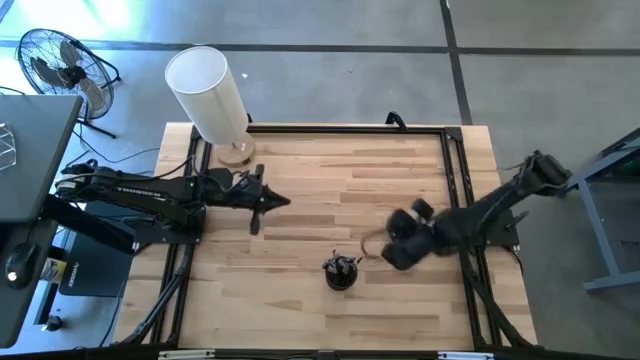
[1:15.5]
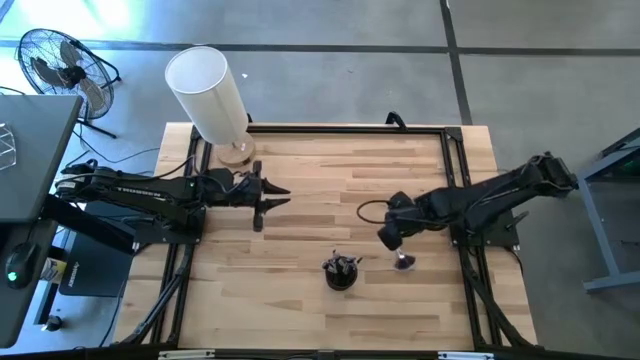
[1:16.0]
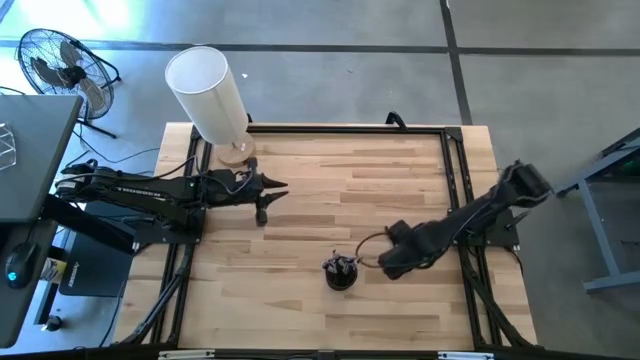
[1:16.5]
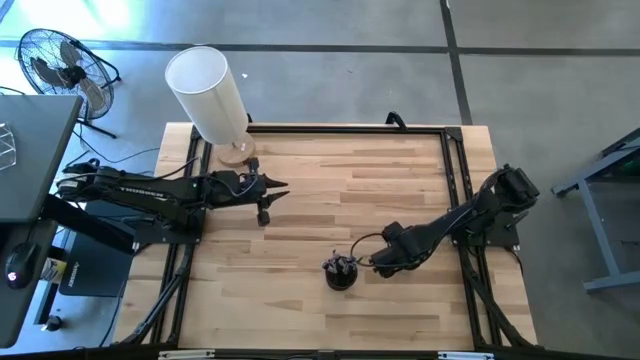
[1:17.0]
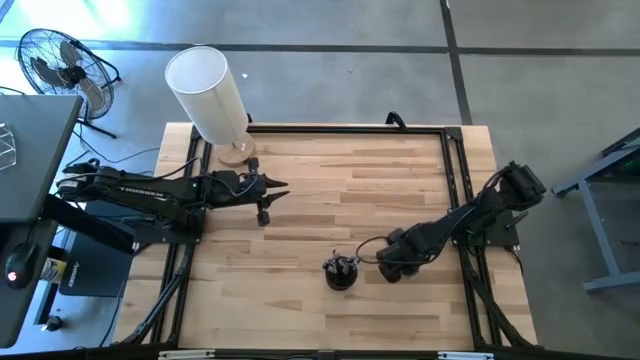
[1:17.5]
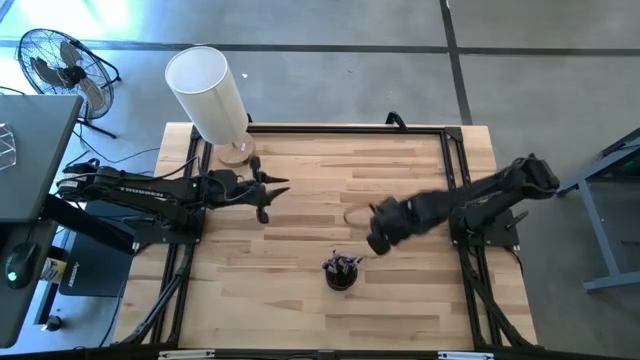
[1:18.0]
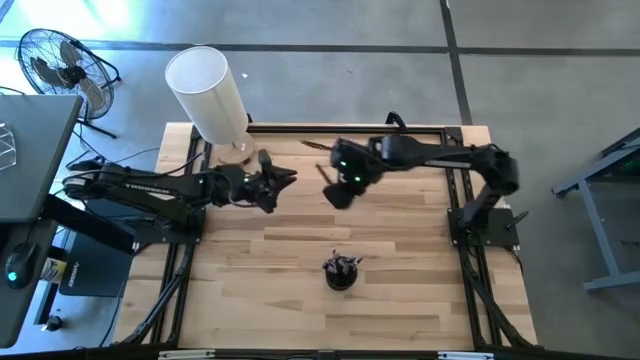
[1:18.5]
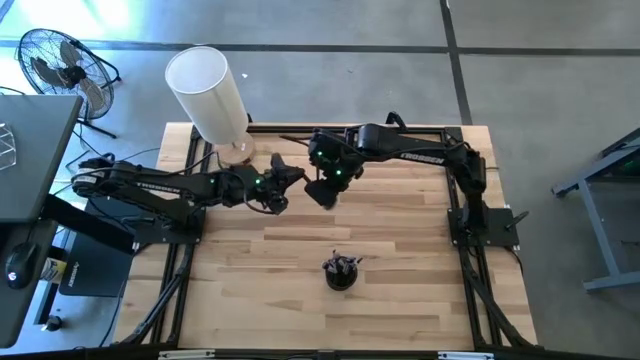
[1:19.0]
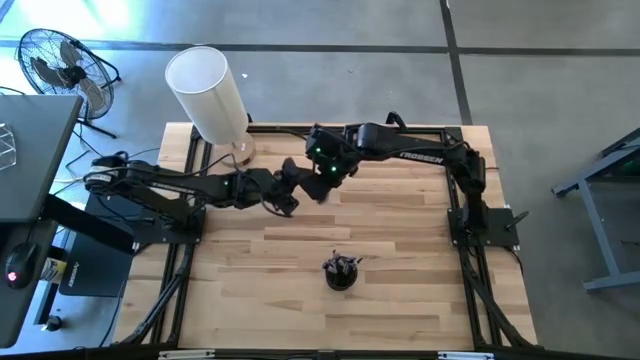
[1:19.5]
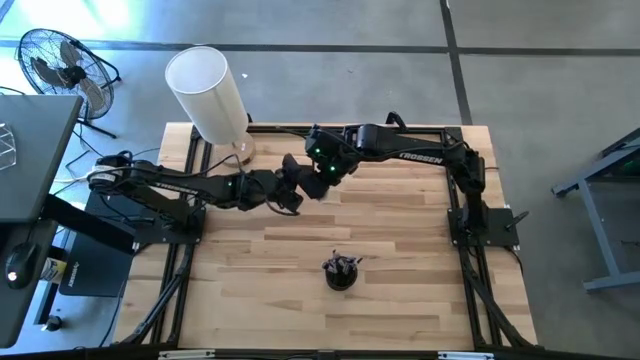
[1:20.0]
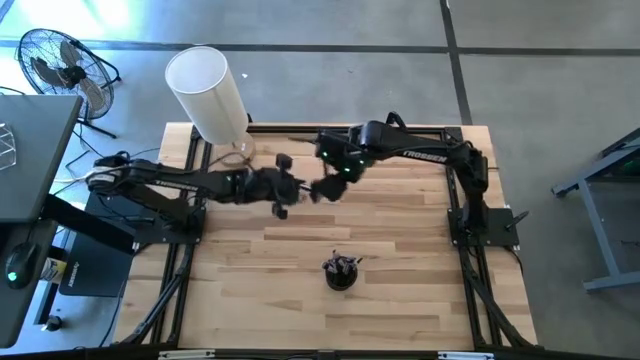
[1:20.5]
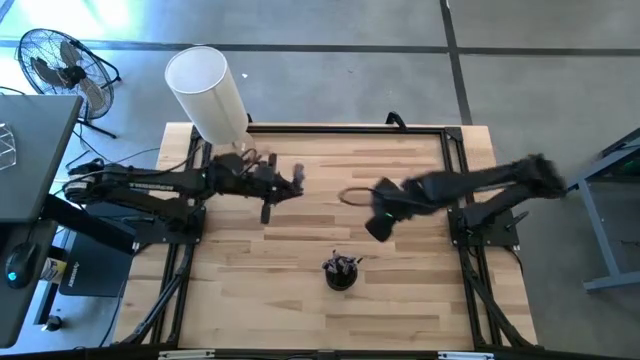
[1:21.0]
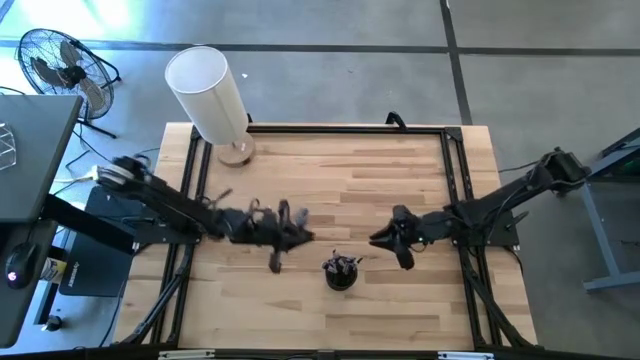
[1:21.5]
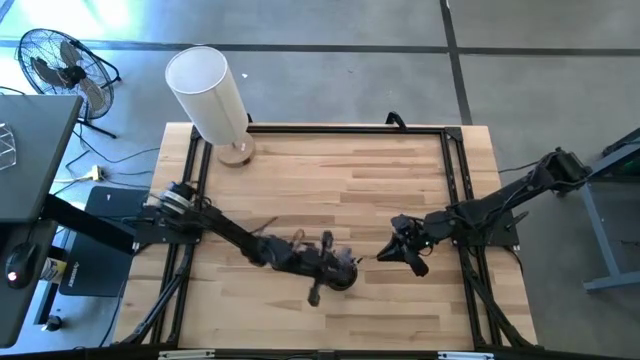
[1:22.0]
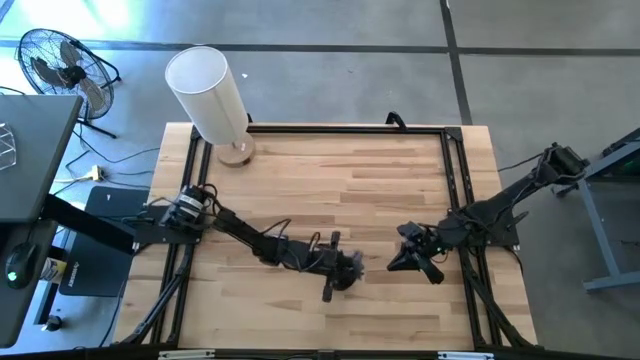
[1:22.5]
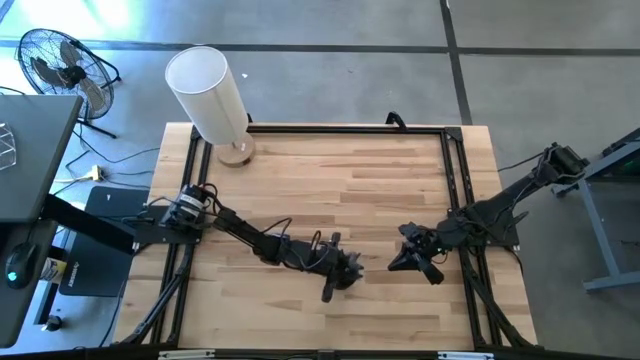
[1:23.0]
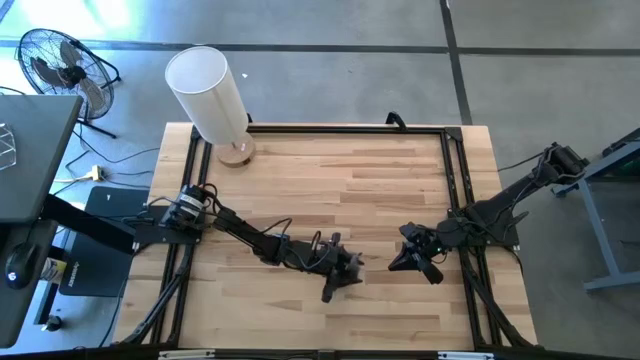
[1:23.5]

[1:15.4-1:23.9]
Task: Pick & Place Makeup Supplies
Put the makeup brush into the black makeup holder

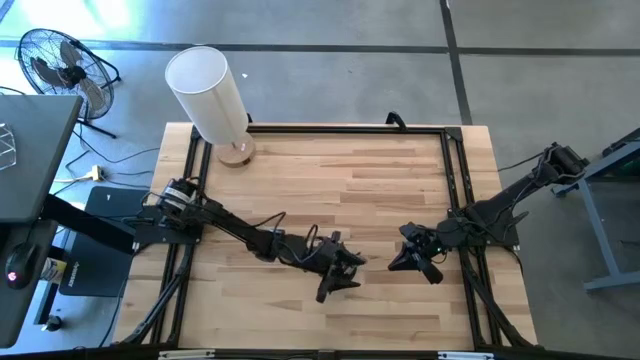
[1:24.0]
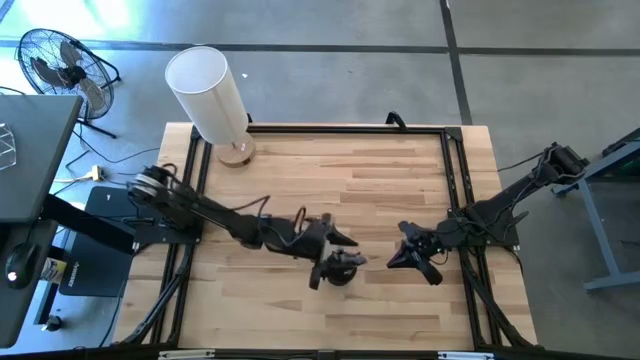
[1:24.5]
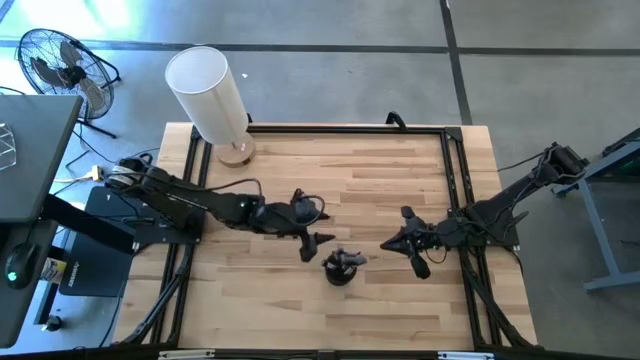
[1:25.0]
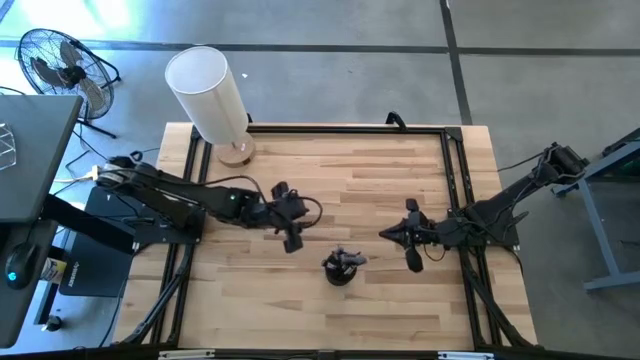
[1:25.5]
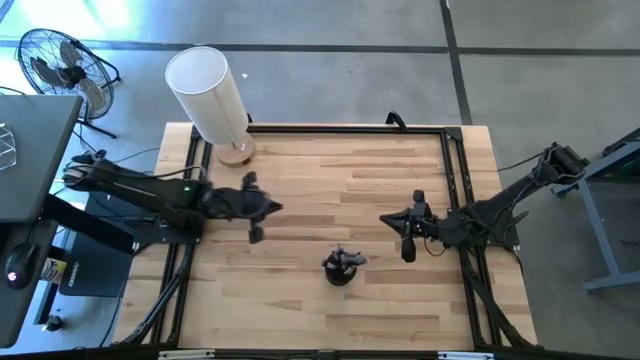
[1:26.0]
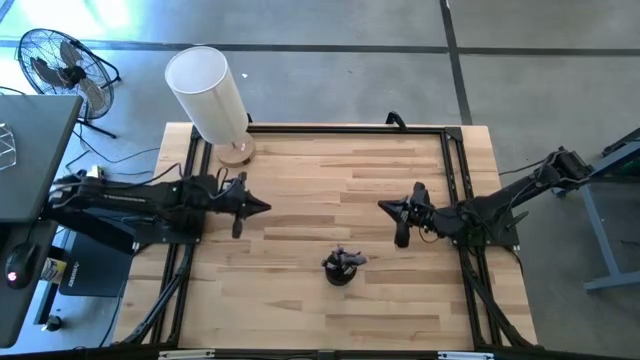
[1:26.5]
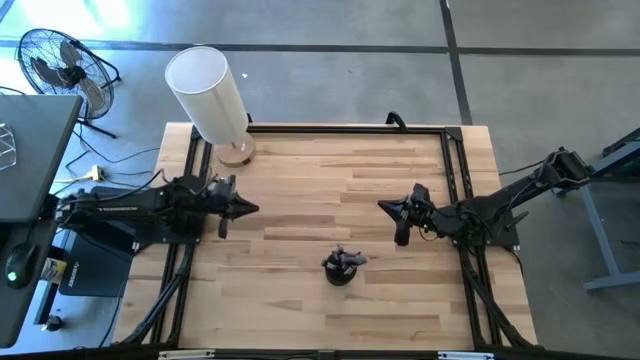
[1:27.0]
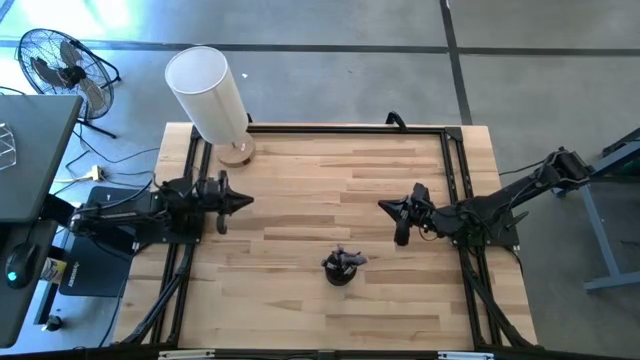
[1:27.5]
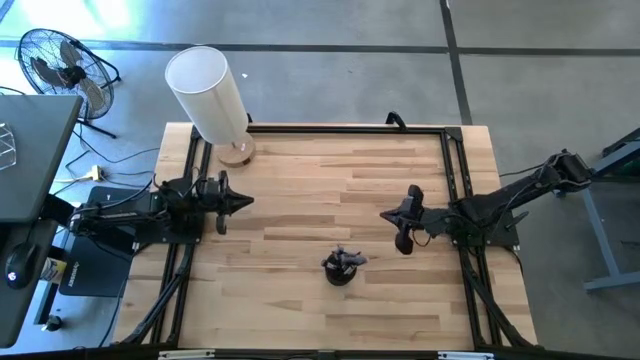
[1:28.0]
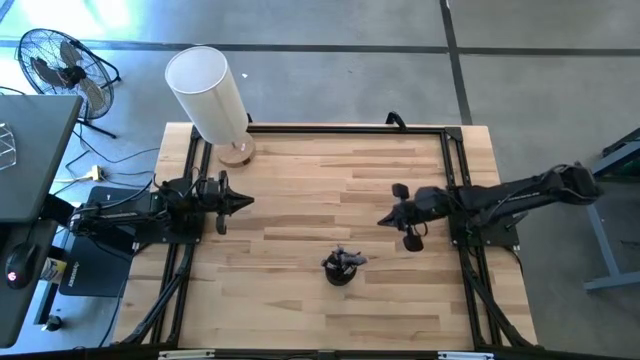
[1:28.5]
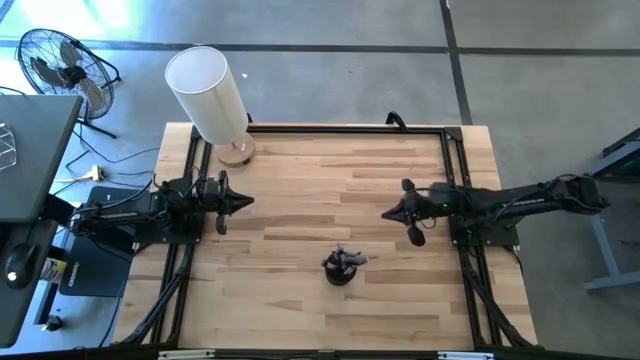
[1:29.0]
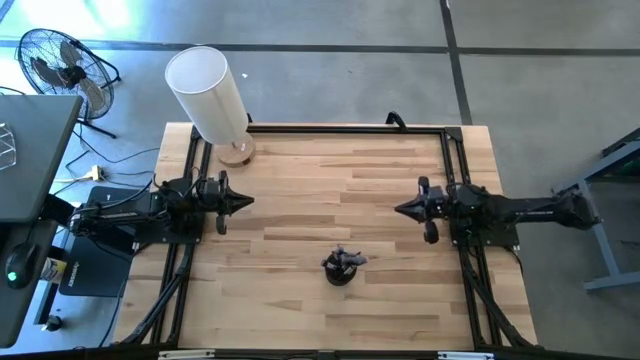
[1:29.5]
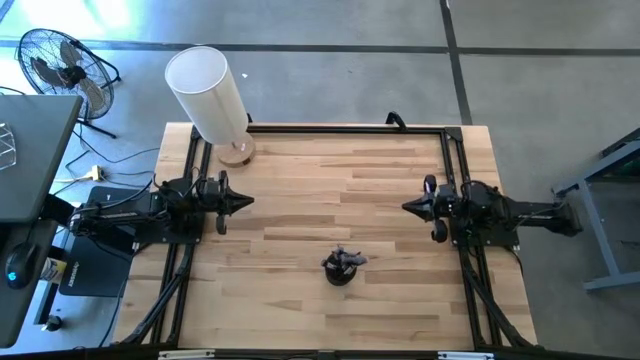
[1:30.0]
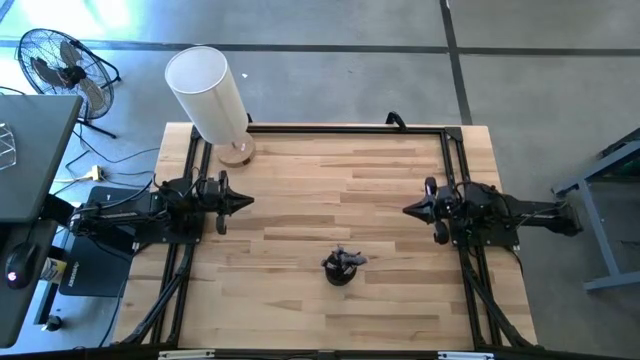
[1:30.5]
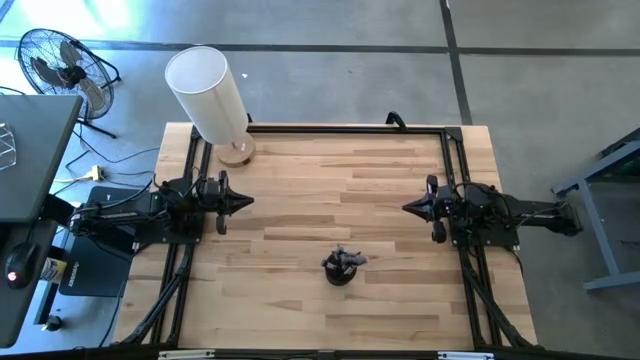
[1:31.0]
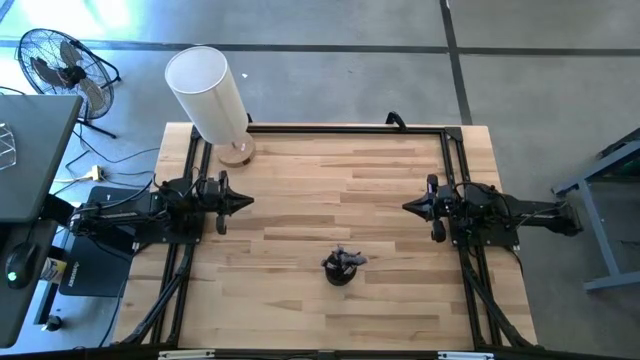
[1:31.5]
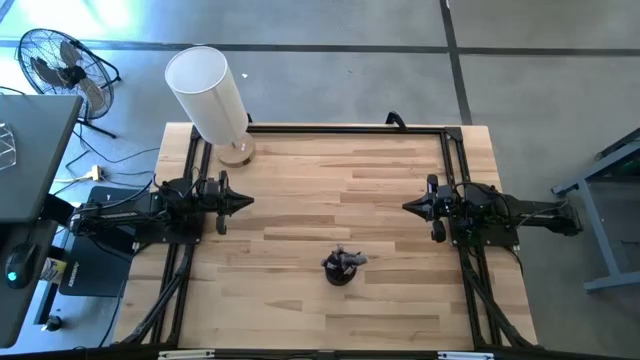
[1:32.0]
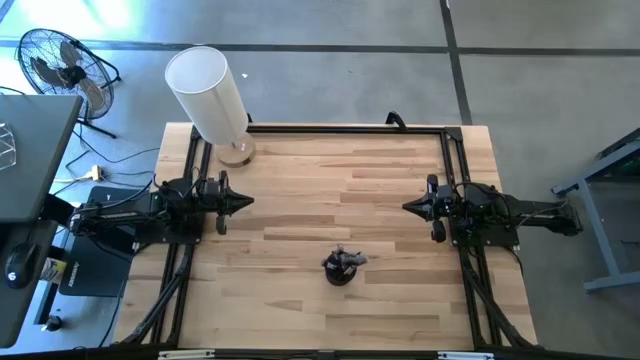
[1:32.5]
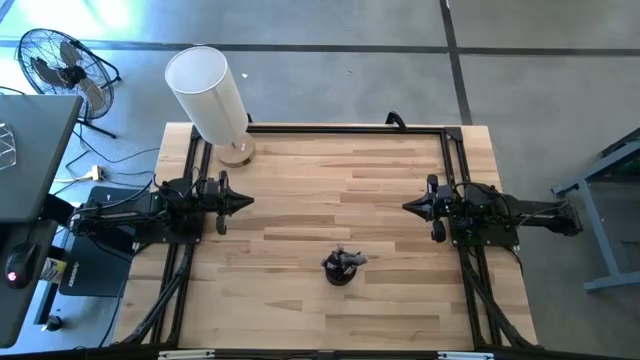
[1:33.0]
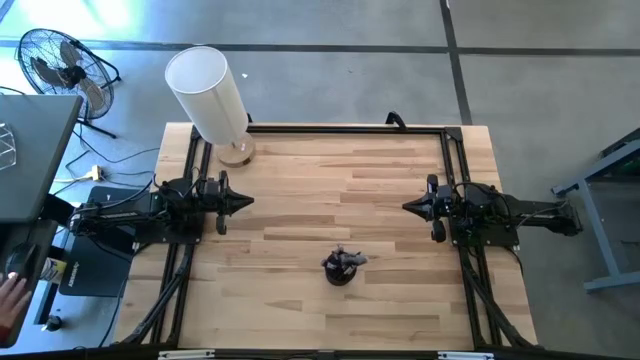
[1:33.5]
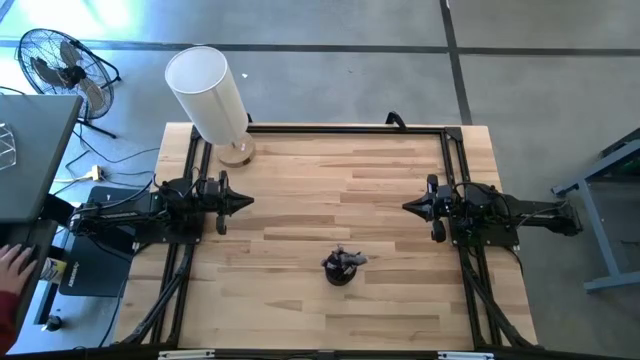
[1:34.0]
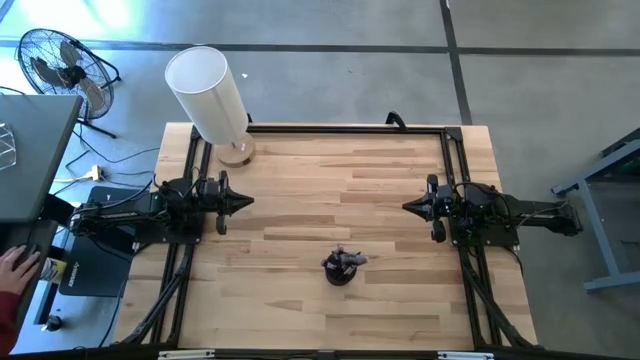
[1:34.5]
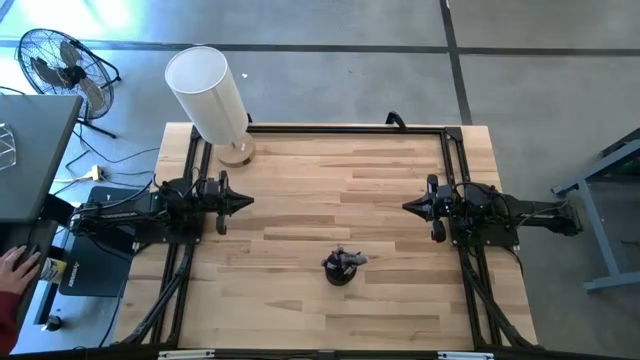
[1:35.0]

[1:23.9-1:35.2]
Return to Home Position

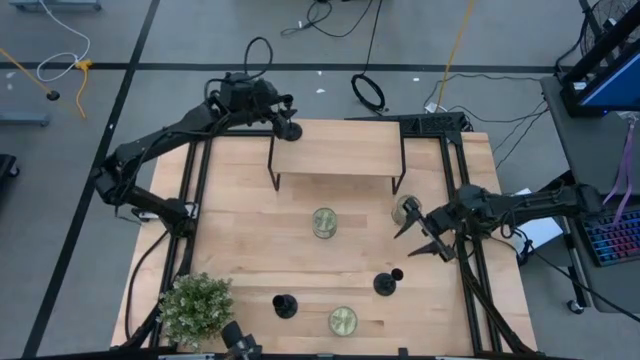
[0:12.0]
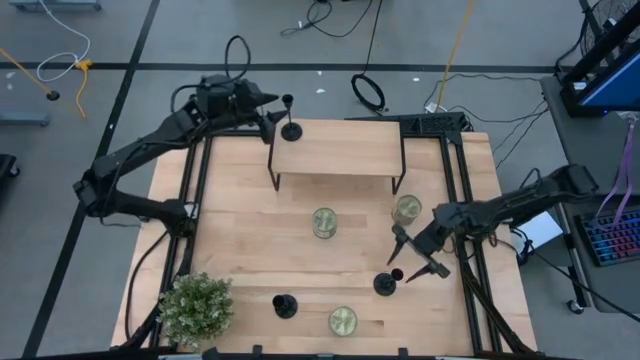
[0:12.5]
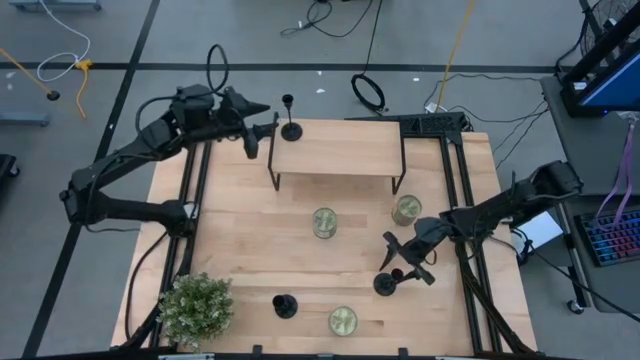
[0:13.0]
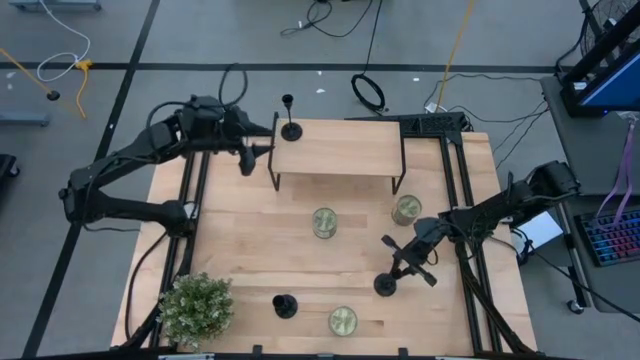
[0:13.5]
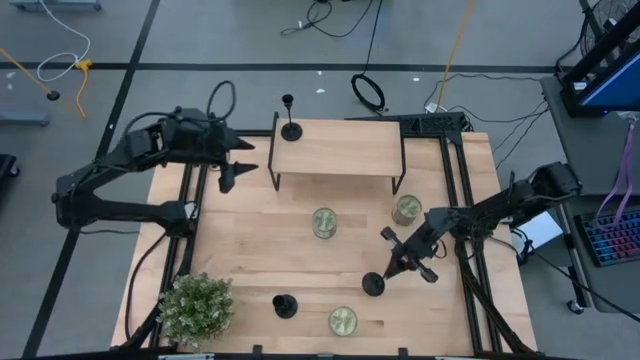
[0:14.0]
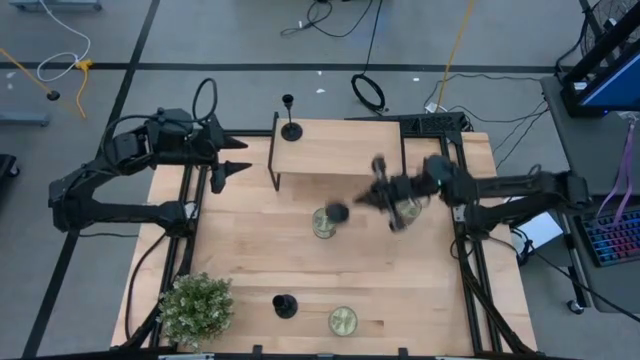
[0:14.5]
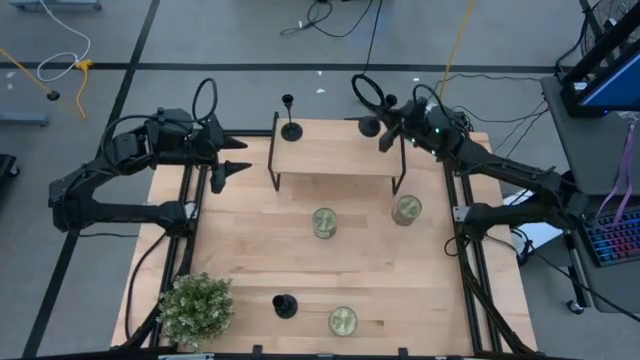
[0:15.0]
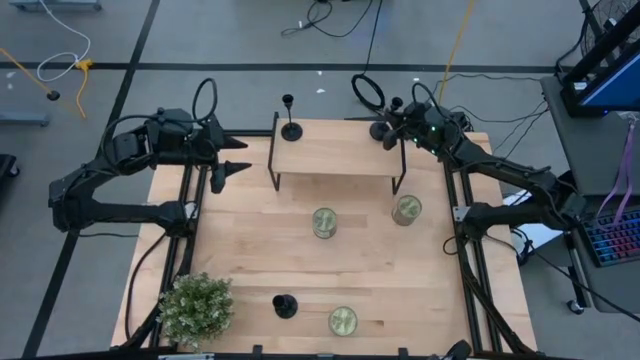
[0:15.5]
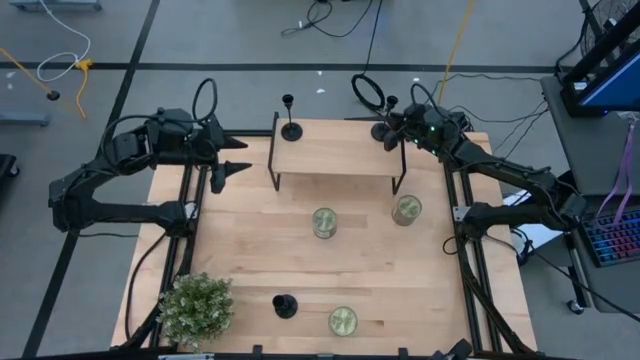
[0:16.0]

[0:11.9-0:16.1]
Task: Pick & Place candle stick holders
Put the right black candle holder on the shelf
